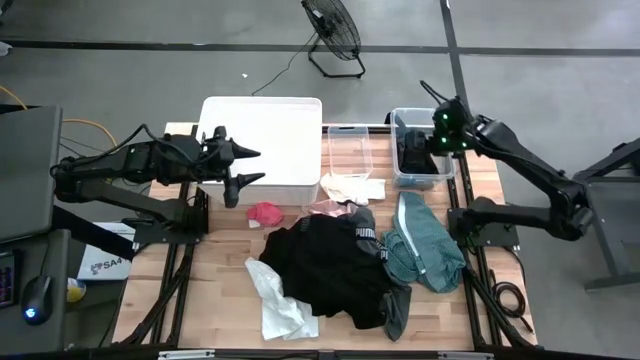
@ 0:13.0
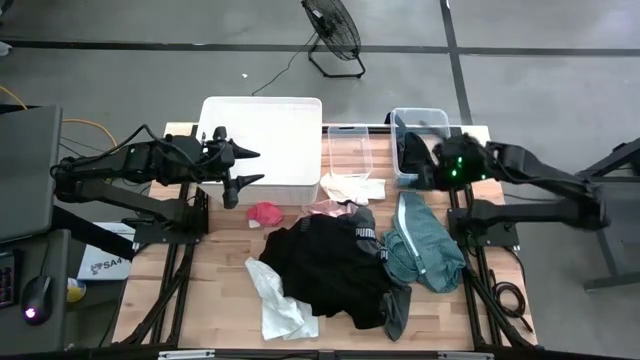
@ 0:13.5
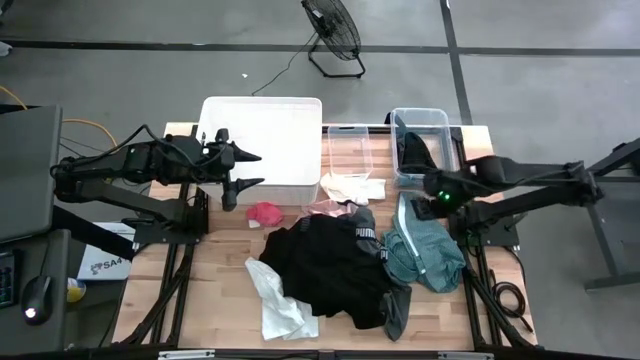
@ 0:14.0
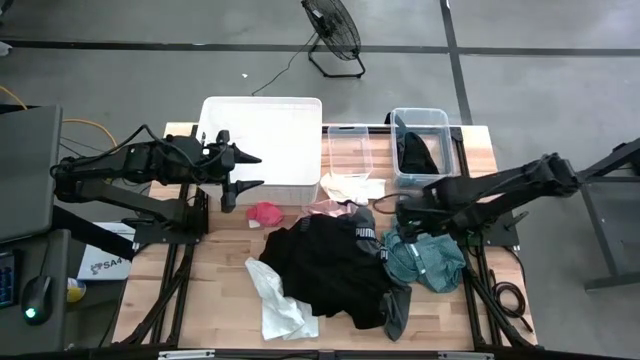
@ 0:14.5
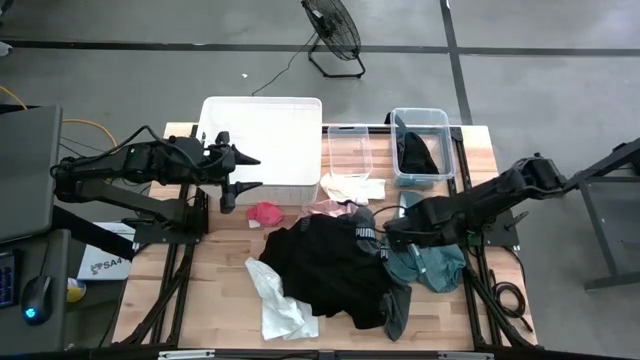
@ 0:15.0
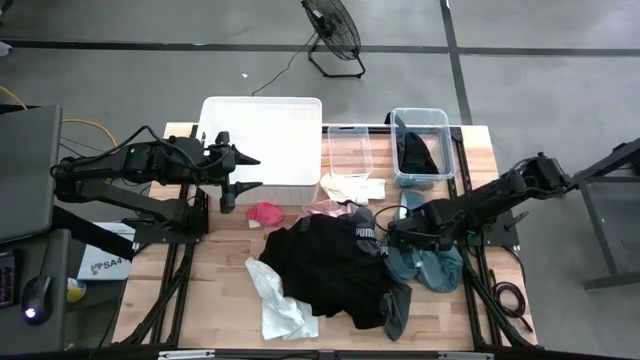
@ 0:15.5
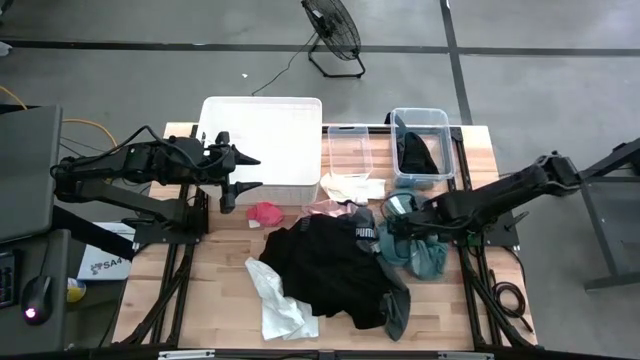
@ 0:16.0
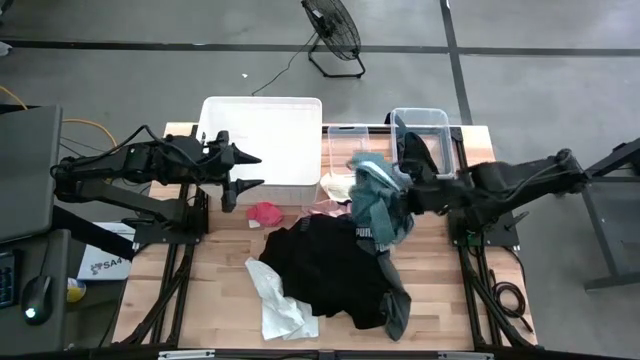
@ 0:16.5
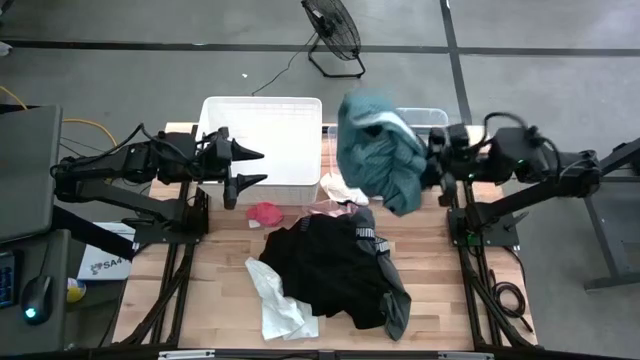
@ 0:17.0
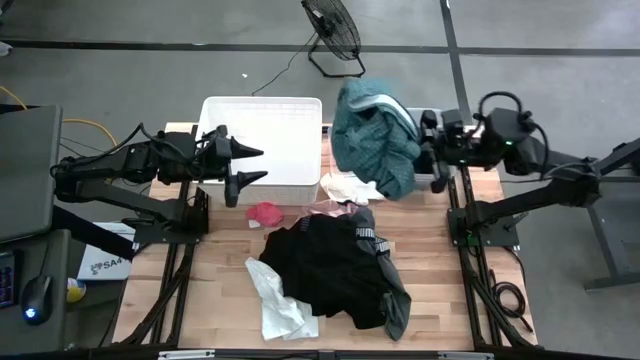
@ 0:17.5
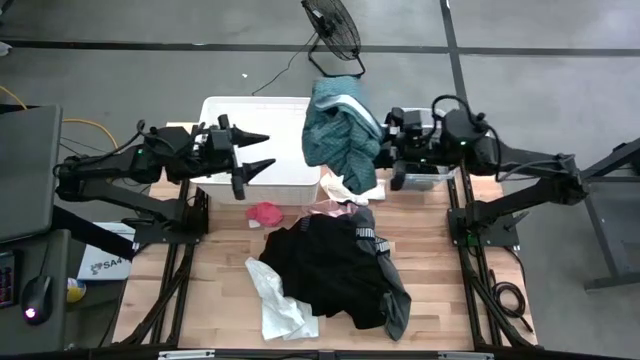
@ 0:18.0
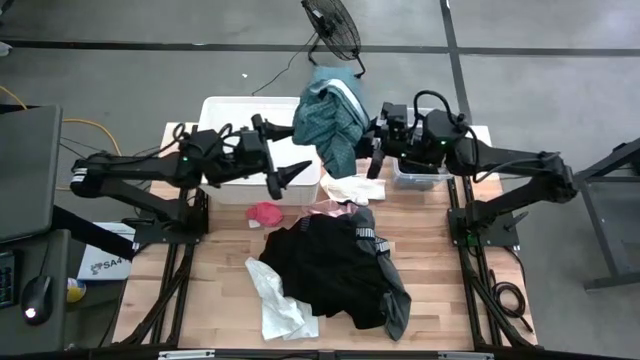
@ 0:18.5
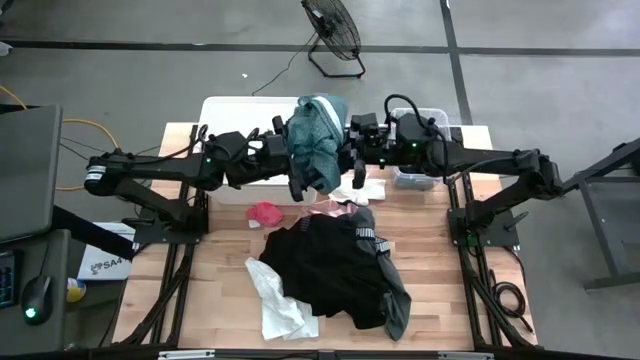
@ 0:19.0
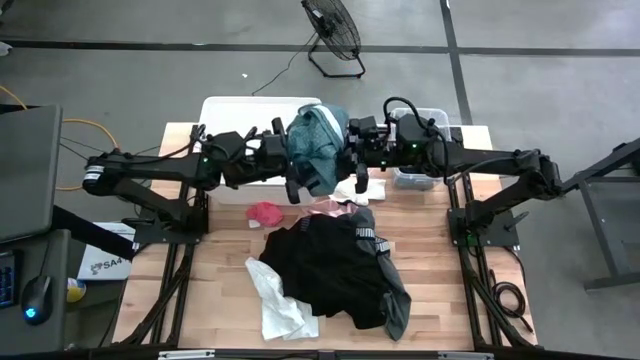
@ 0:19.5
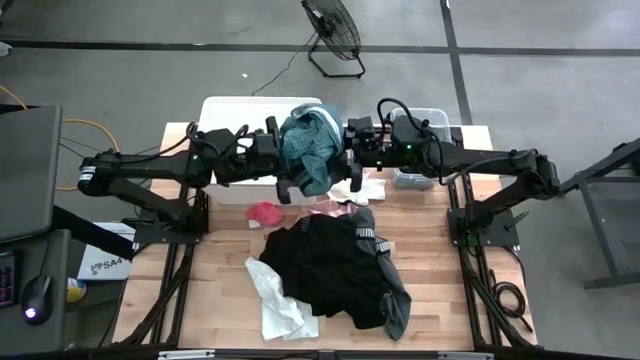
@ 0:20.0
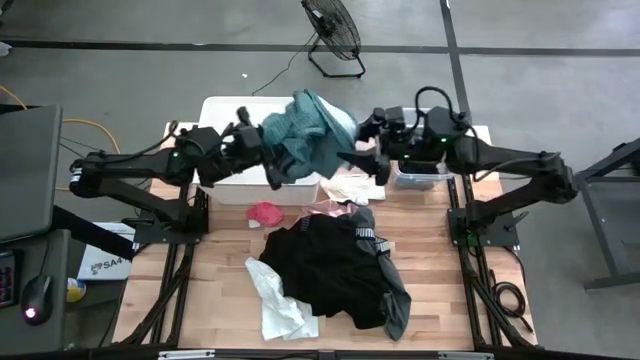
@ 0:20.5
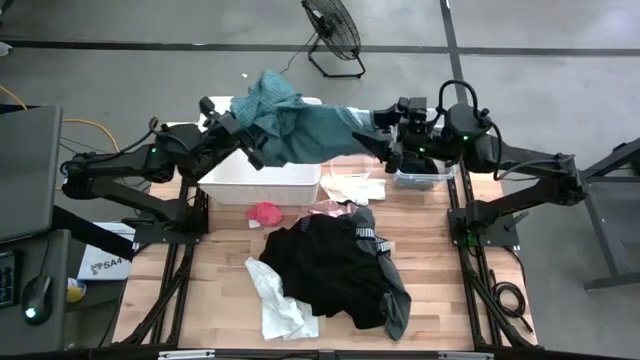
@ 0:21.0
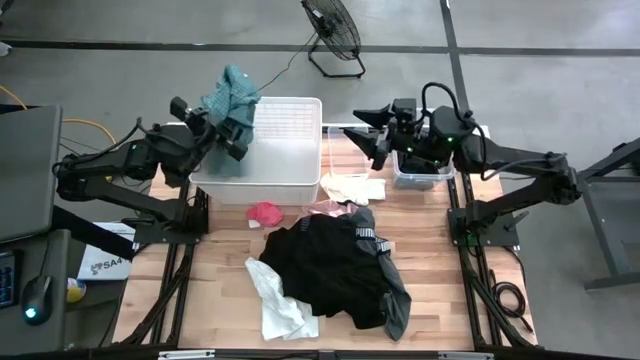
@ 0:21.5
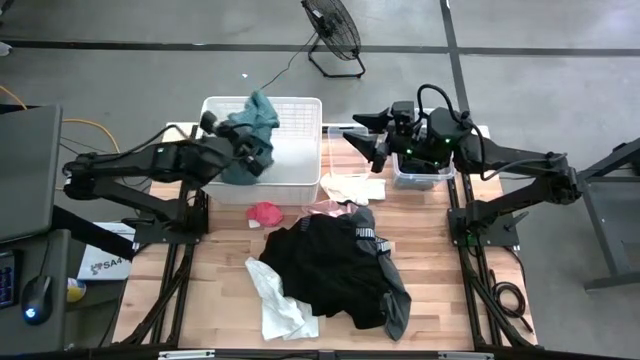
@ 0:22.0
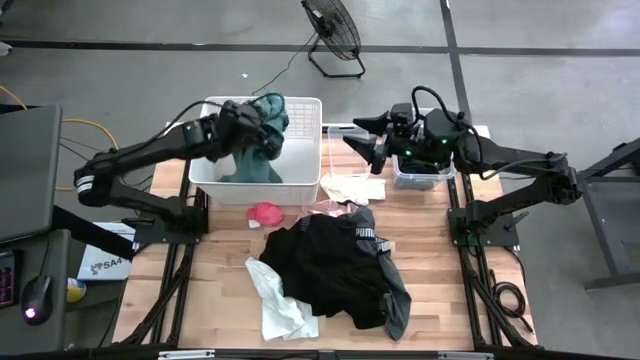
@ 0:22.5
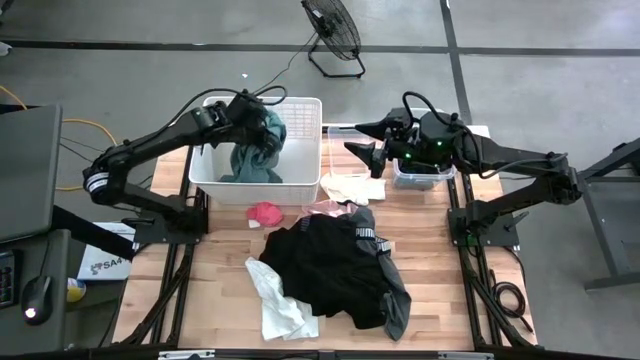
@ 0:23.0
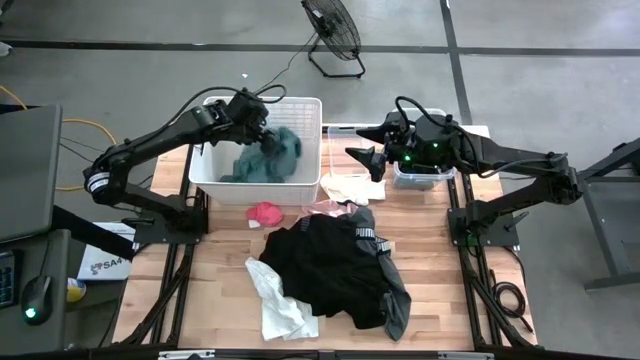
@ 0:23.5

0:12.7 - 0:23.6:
Task: Pick & Place Cloths
Put the blue polo shirt into the white bin

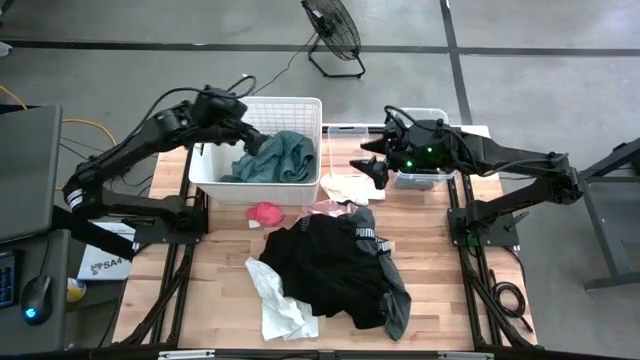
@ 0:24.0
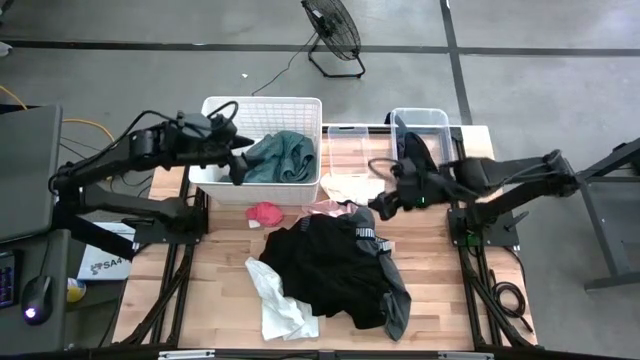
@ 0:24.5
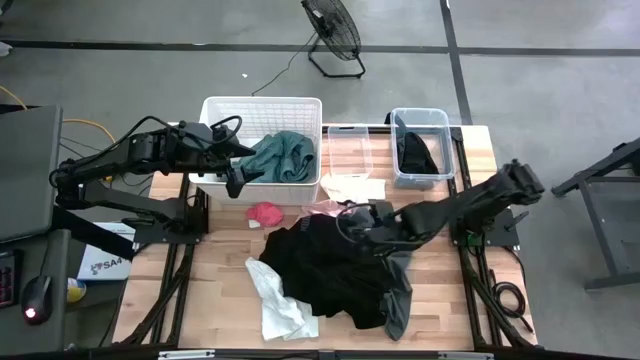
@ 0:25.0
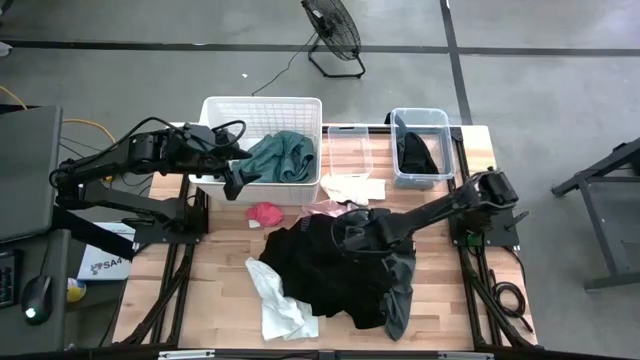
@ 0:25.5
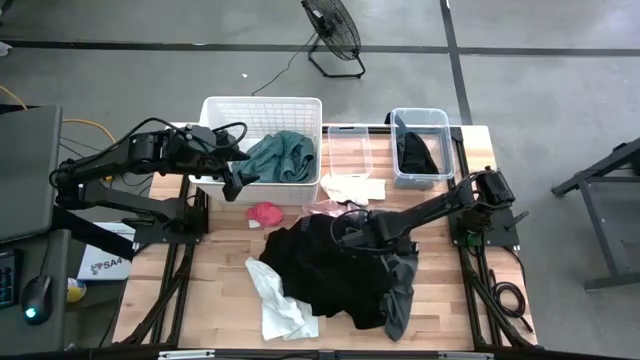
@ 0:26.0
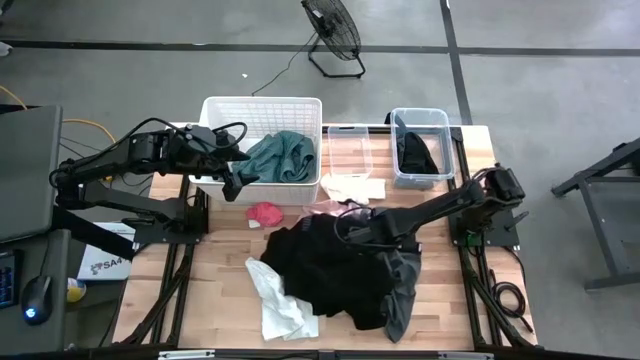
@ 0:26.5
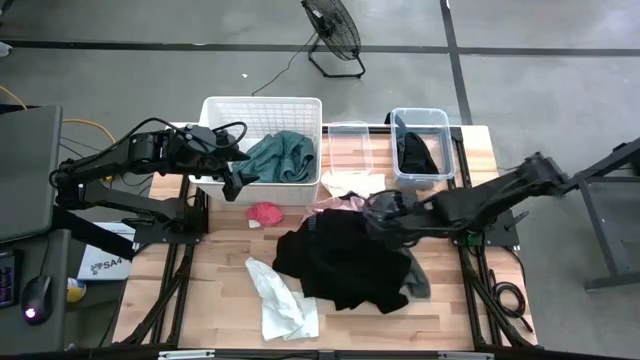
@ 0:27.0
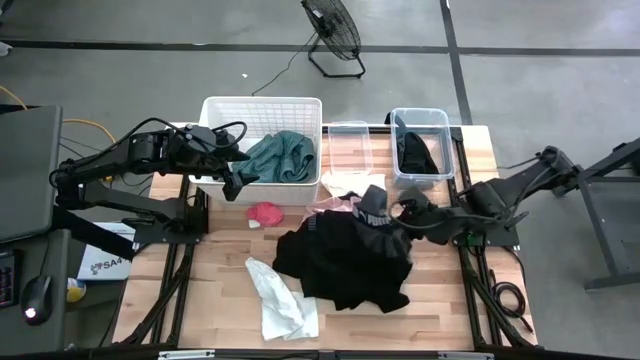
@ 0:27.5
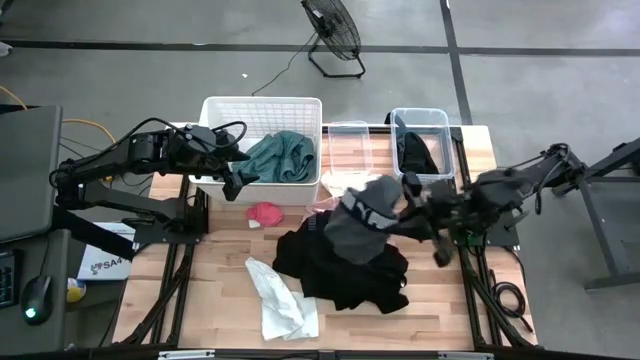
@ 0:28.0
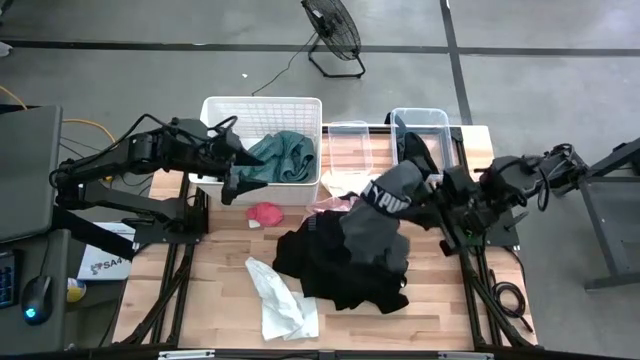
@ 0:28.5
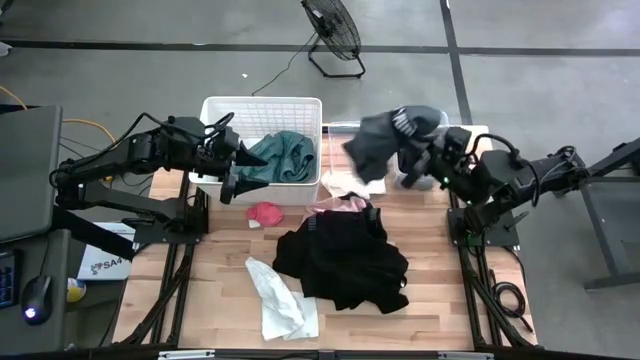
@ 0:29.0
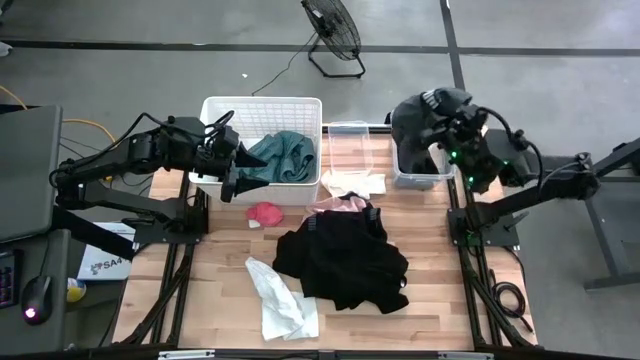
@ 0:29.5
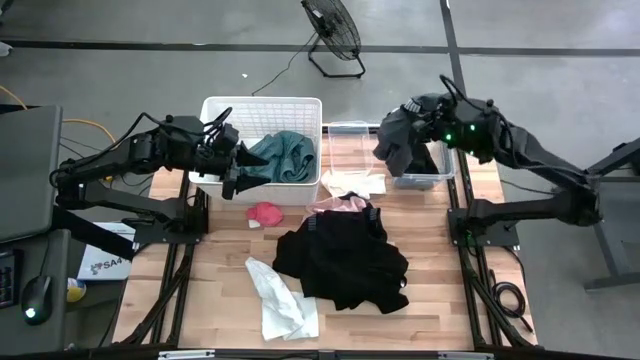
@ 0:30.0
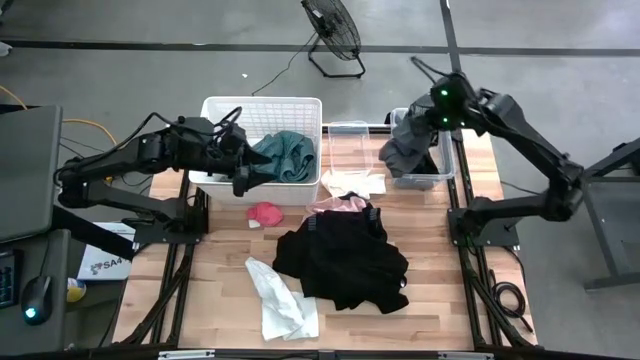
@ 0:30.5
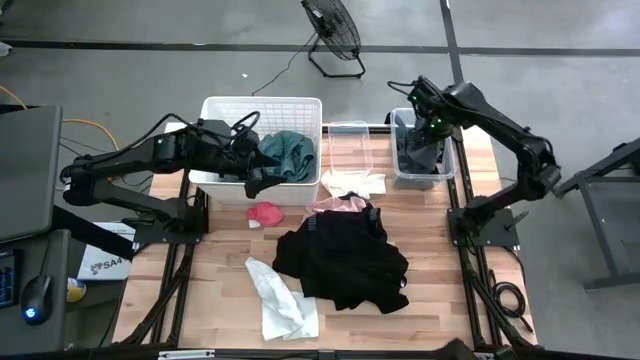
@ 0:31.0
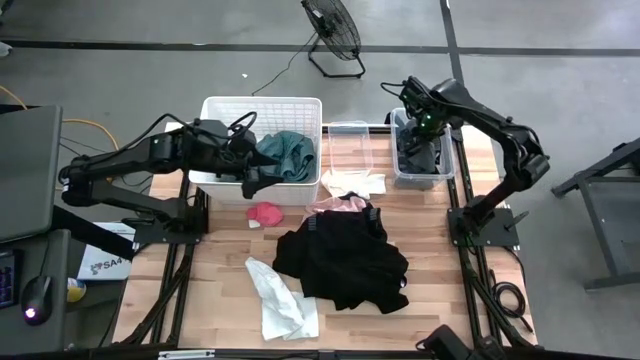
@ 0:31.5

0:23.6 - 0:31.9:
Put the gray boxer short into the right transparent bin

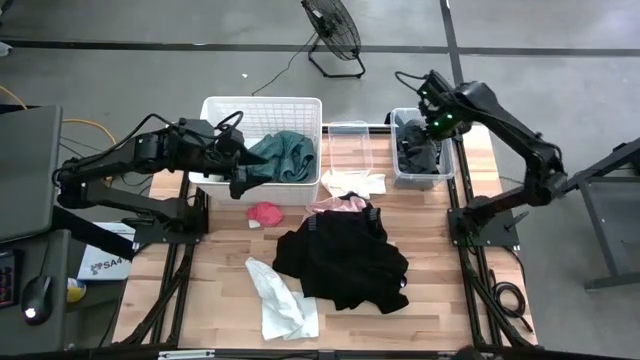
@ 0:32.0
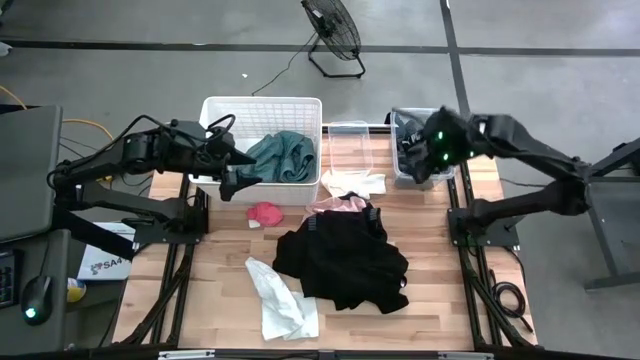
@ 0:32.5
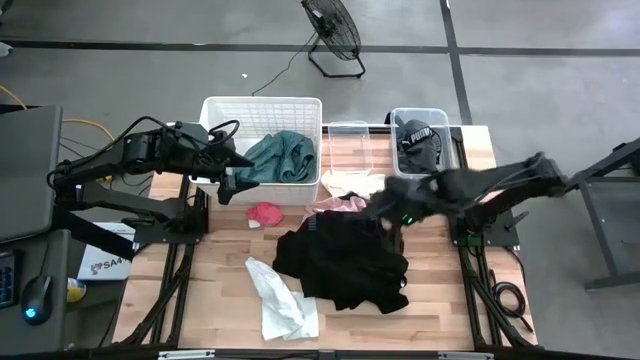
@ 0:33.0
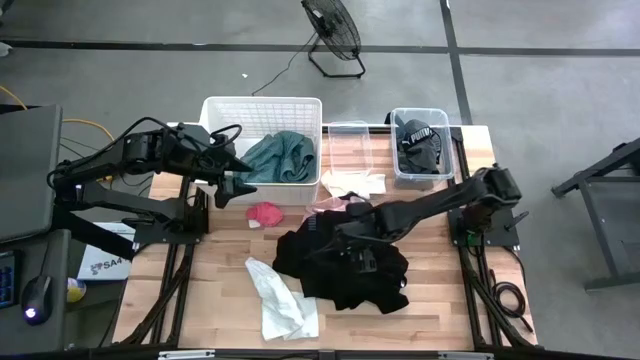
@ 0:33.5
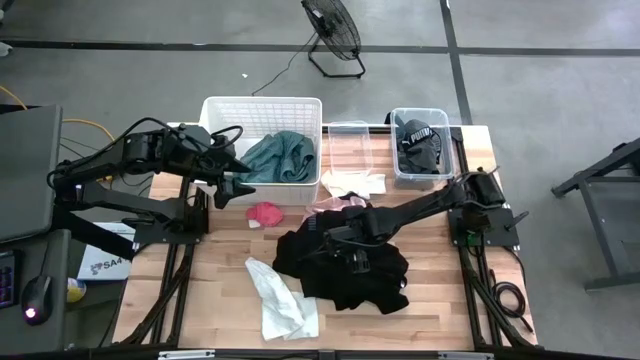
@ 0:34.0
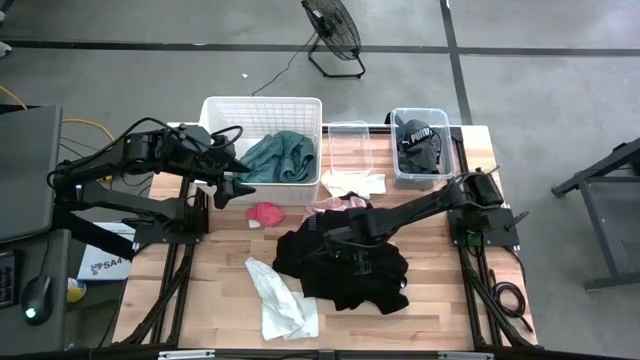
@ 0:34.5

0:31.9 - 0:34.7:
Put the black t-shirt into the right transparent bin
